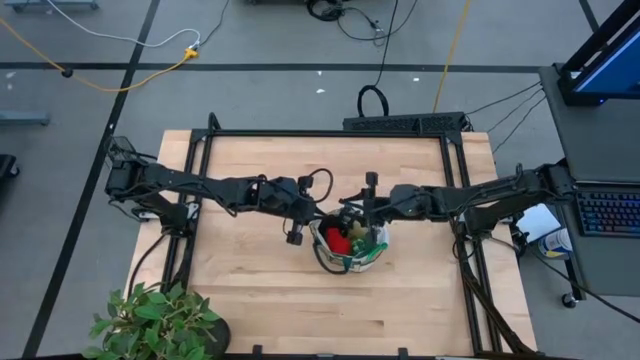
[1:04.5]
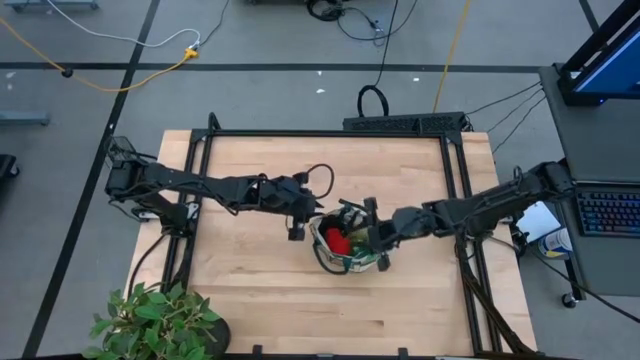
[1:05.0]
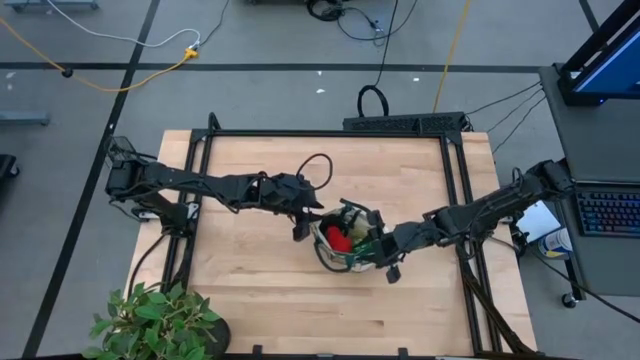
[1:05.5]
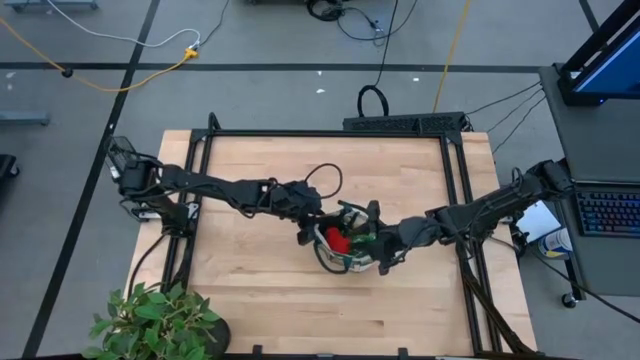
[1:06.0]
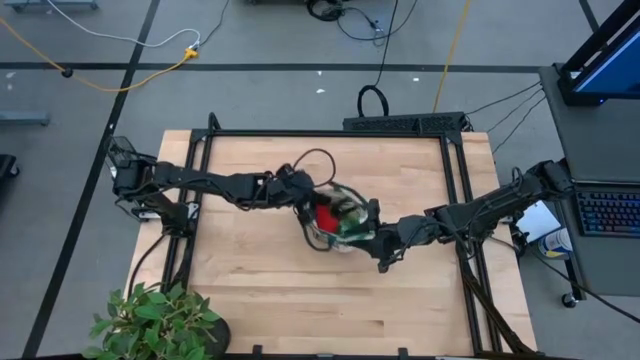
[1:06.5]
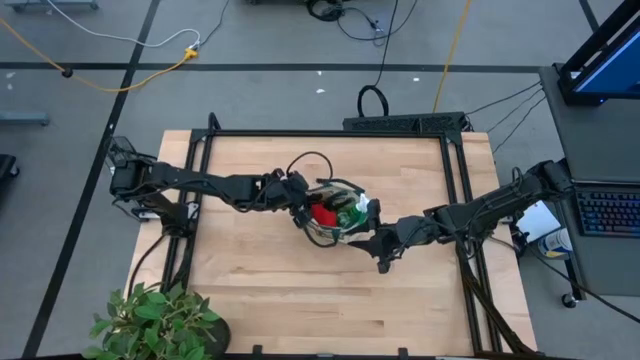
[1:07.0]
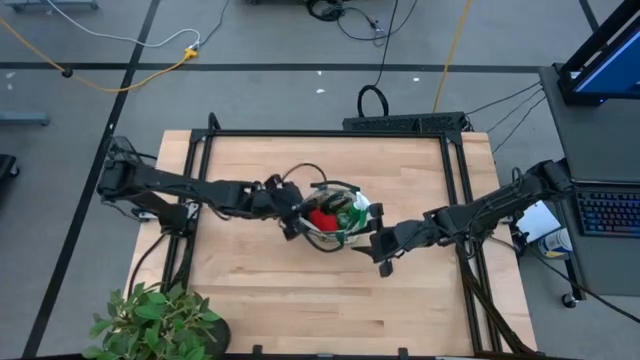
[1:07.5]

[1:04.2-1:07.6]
Task: Pick & Place Garden tools in Gardening bag
Adjust the light brown gardening bag

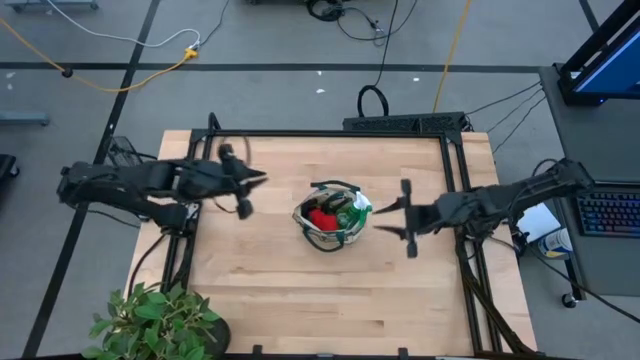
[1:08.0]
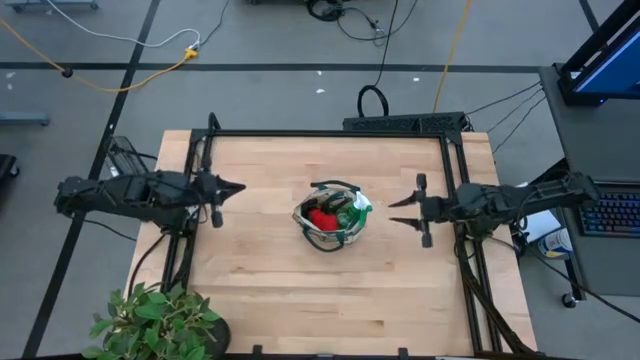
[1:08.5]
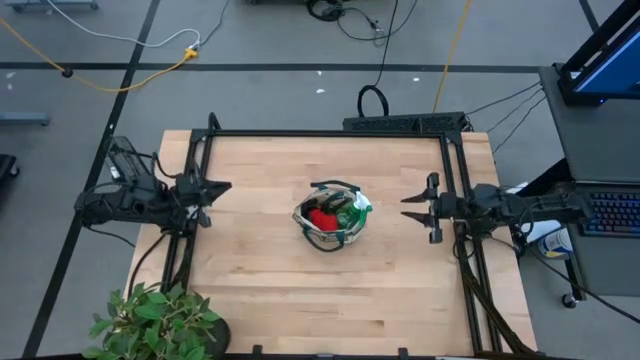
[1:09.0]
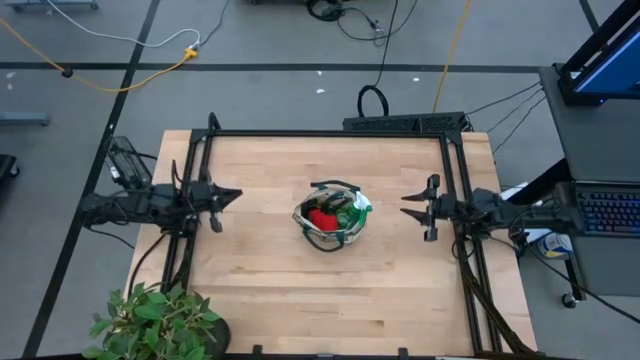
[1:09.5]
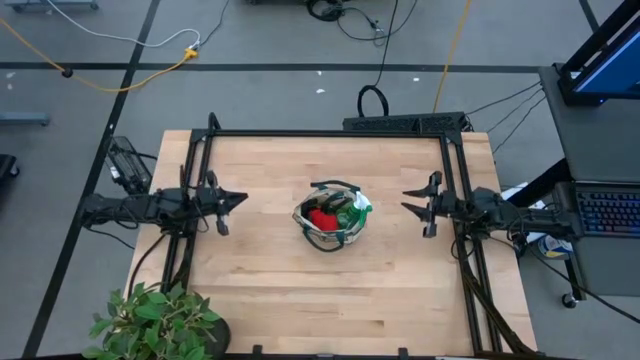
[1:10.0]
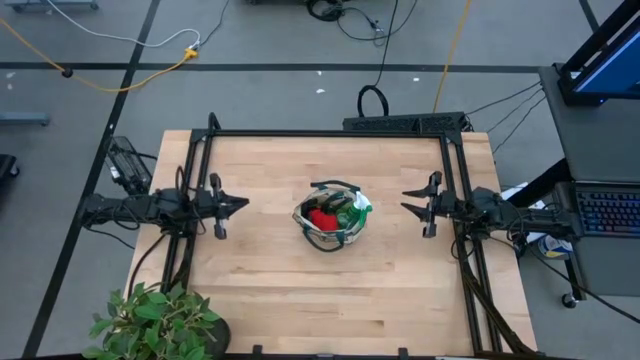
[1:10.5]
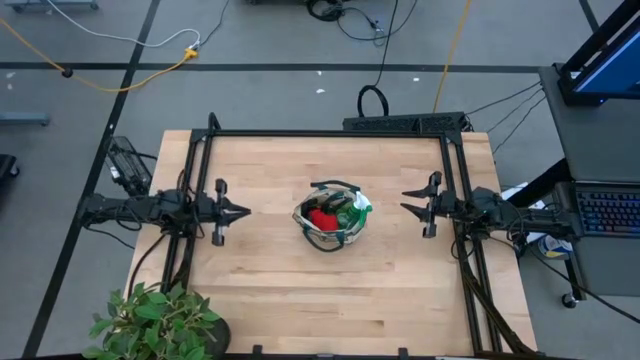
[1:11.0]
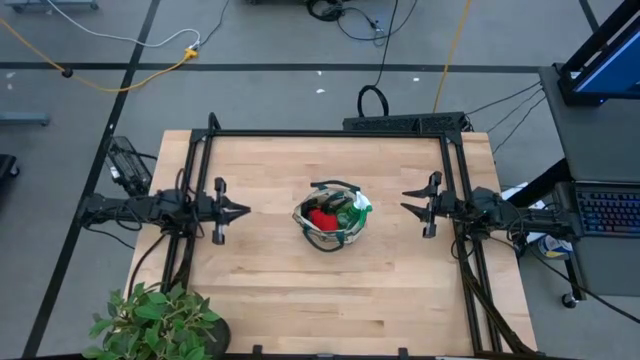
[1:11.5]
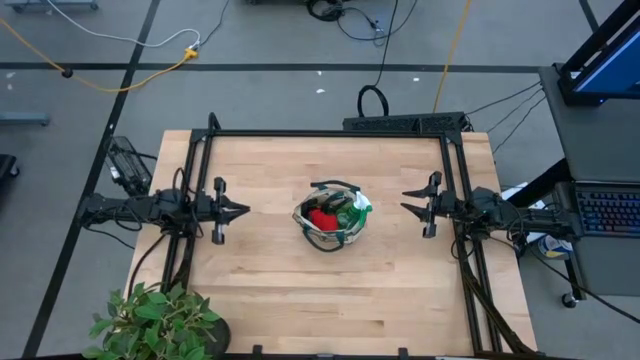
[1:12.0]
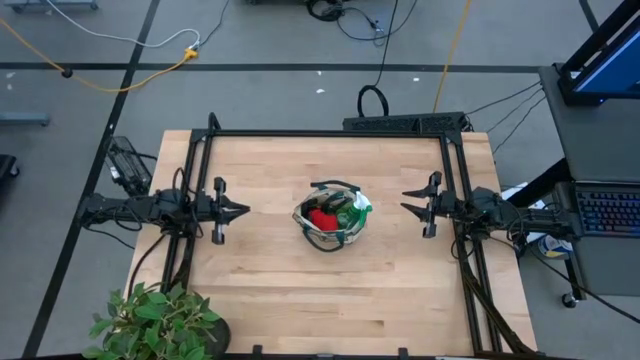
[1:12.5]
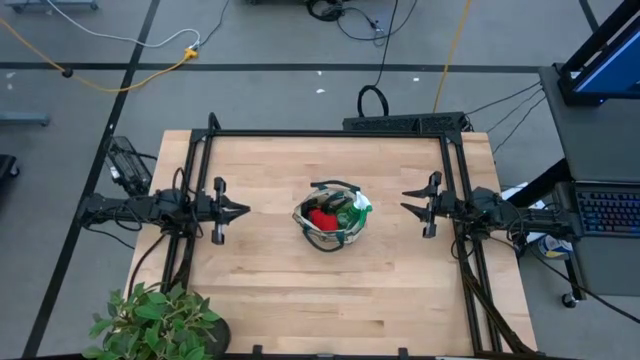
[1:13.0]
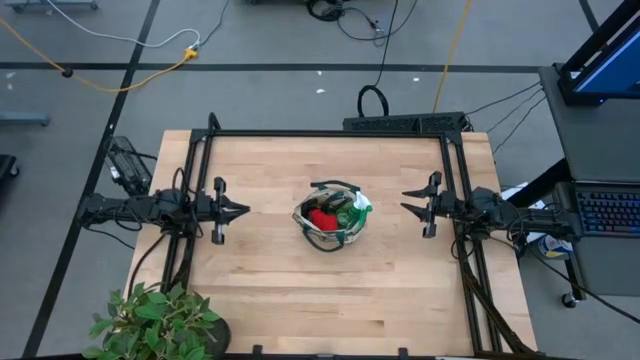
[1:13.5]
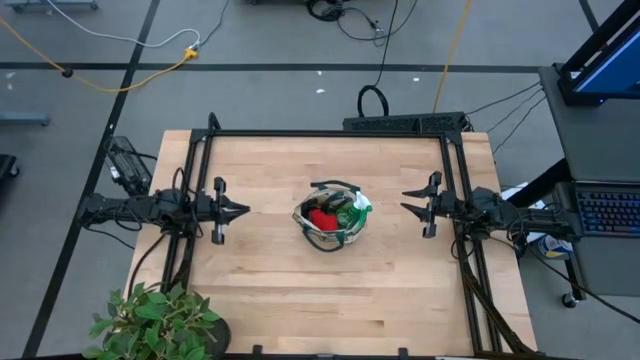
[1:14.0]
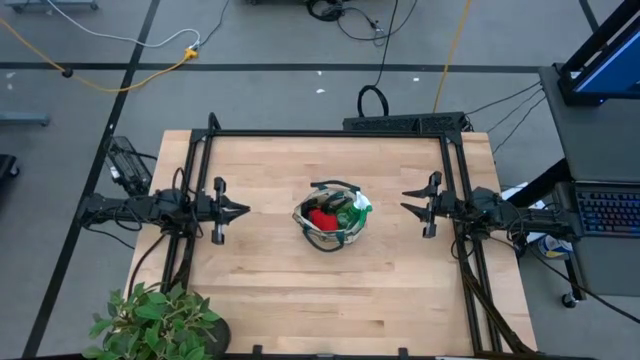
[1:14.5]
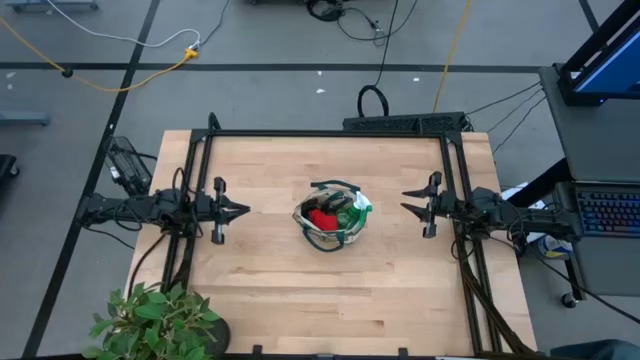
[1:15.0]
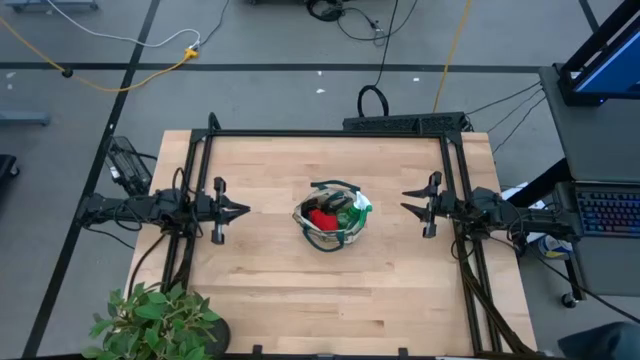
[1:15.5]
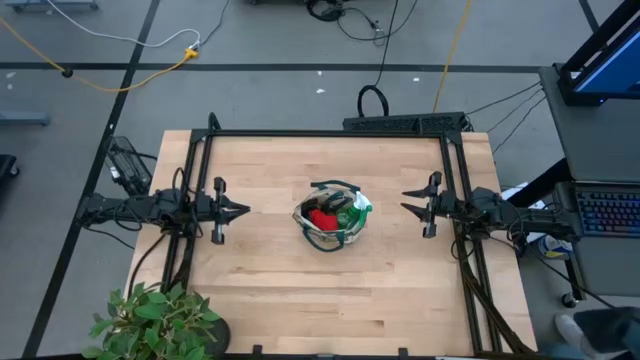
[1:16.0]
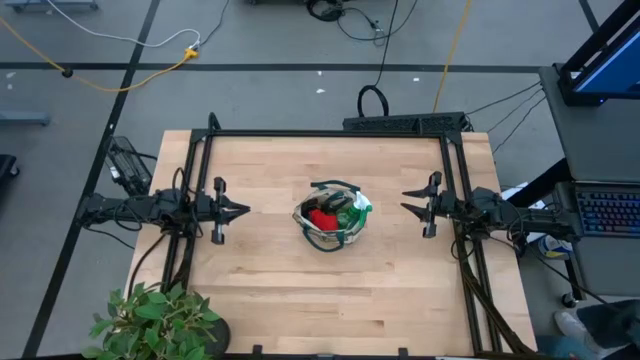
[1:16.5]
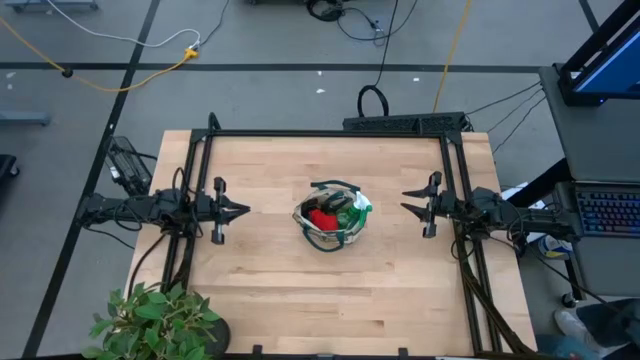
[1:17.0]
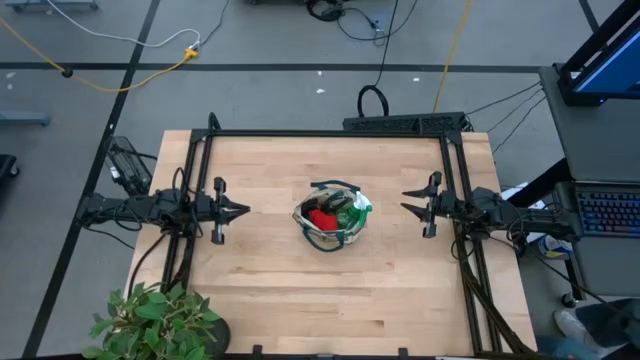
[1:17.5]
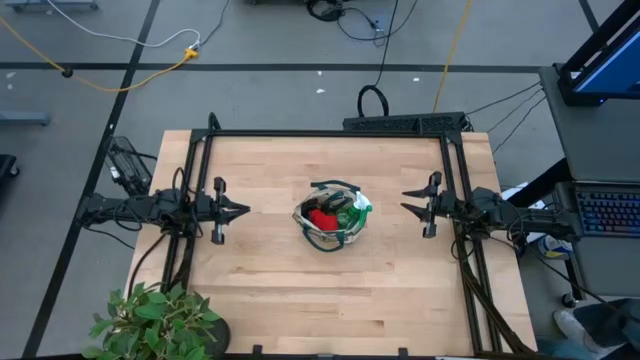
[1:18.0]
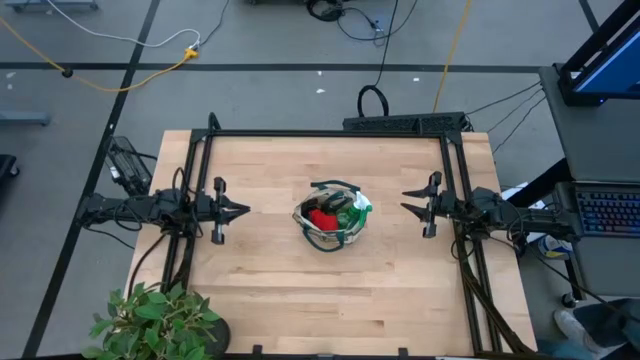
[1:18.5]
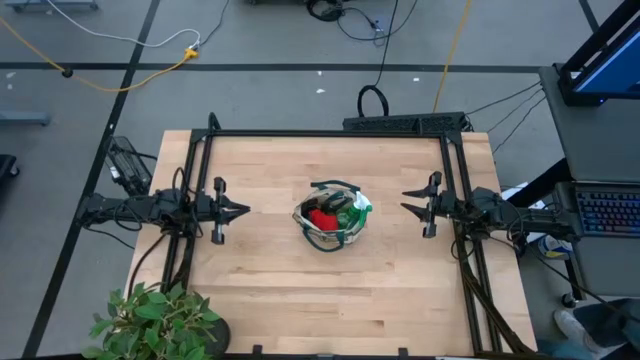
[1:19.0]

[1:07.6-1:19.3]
Return to Home Position

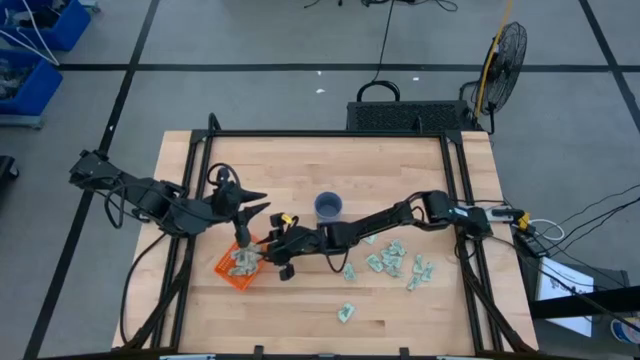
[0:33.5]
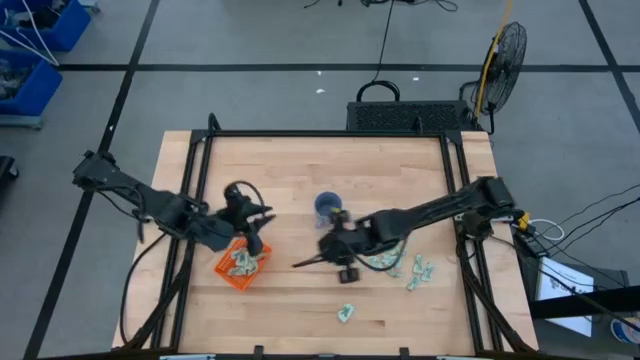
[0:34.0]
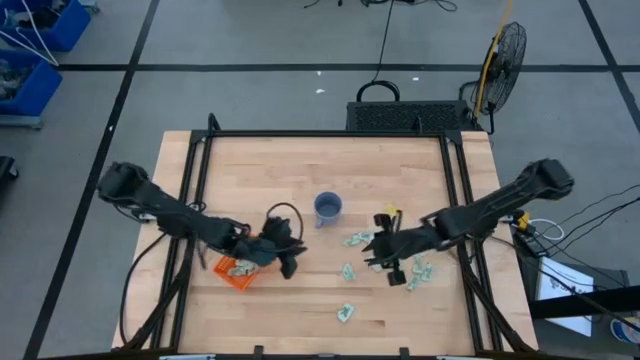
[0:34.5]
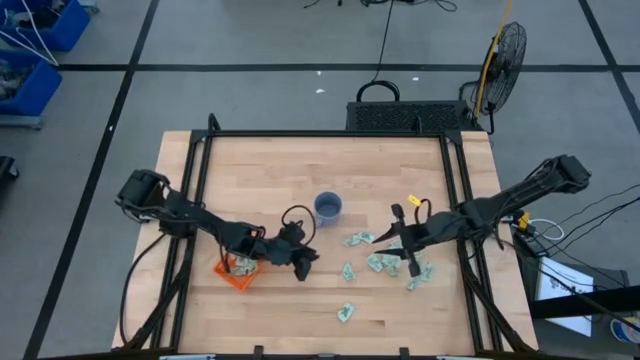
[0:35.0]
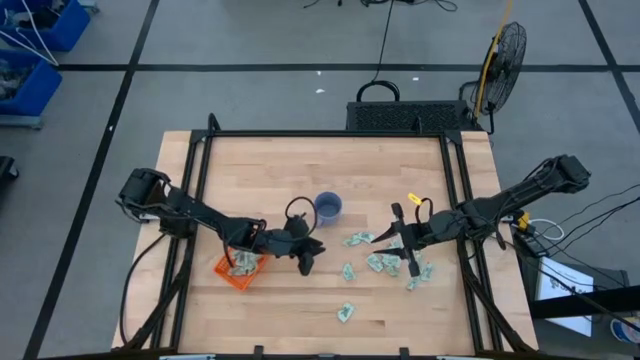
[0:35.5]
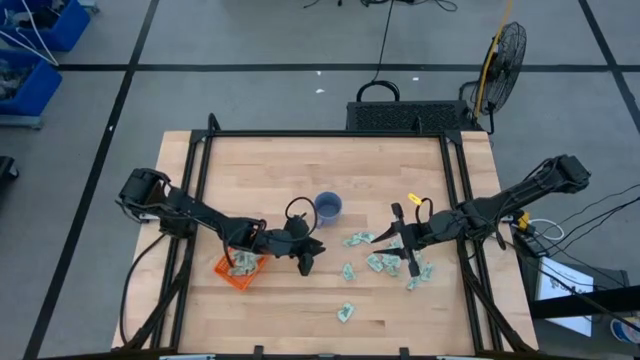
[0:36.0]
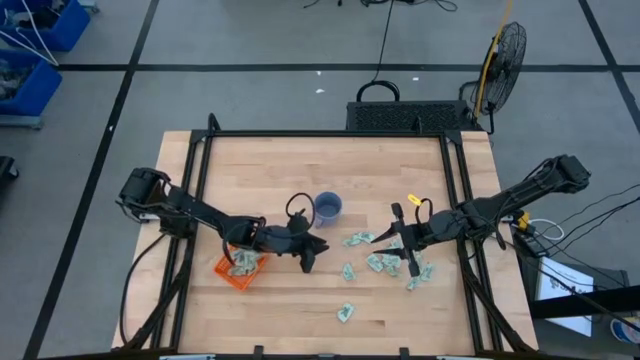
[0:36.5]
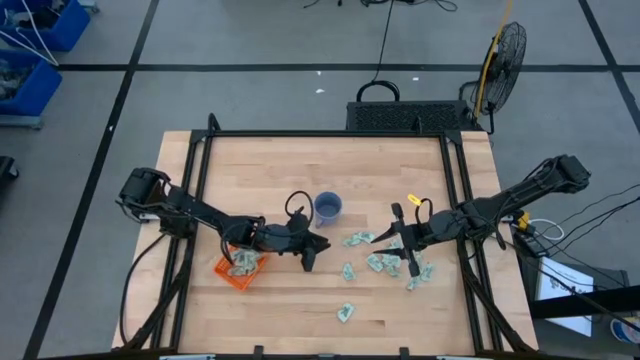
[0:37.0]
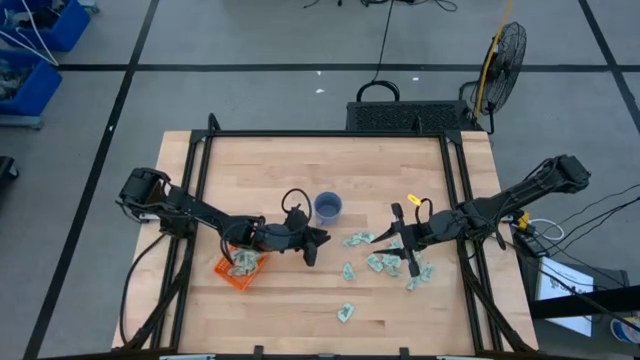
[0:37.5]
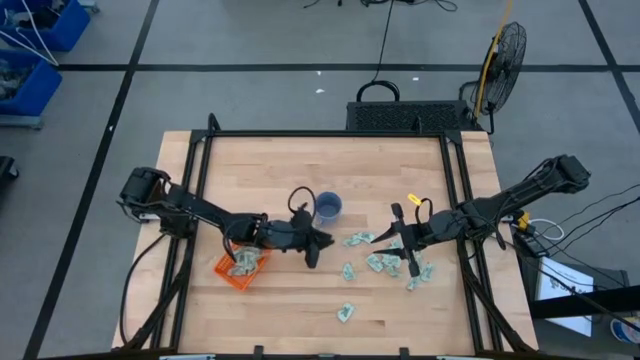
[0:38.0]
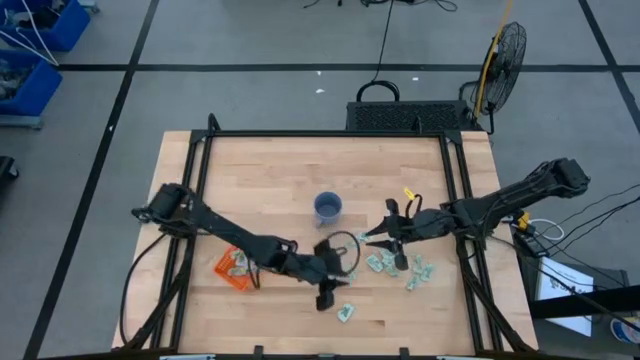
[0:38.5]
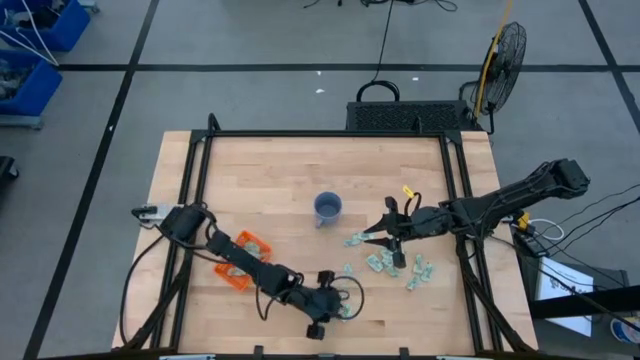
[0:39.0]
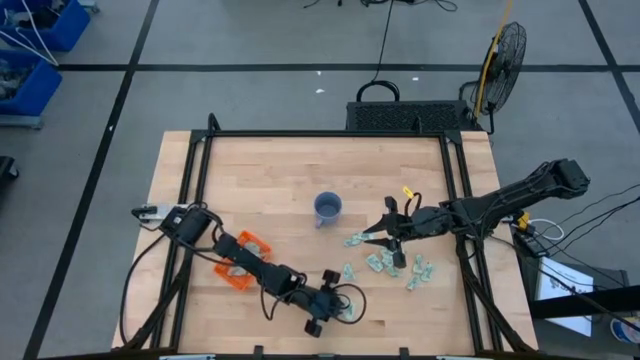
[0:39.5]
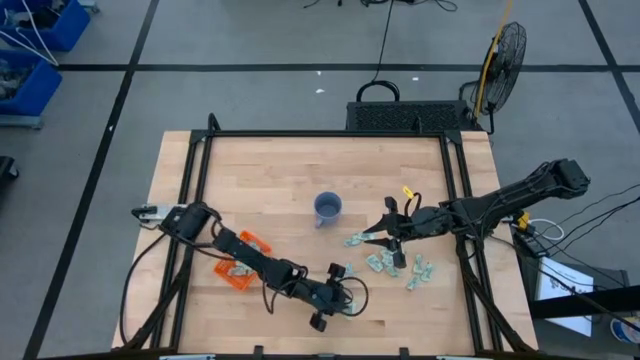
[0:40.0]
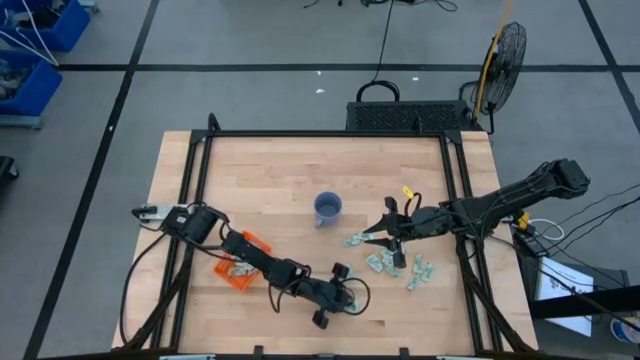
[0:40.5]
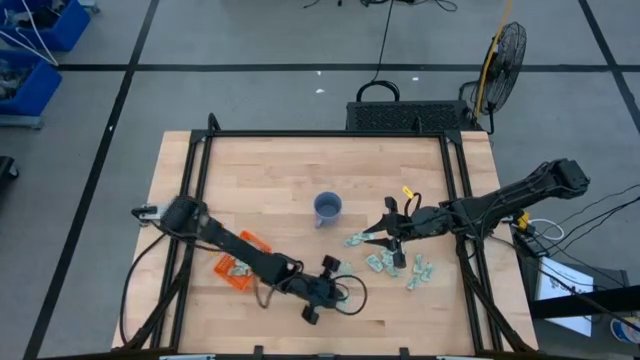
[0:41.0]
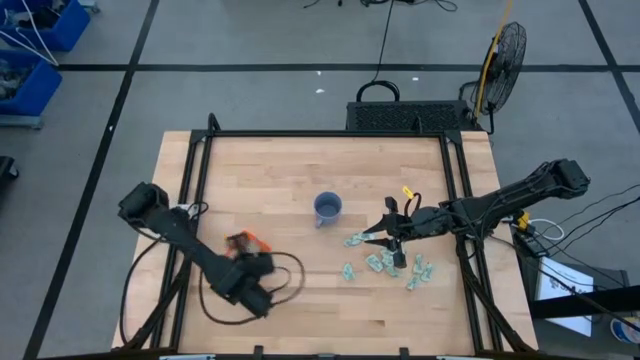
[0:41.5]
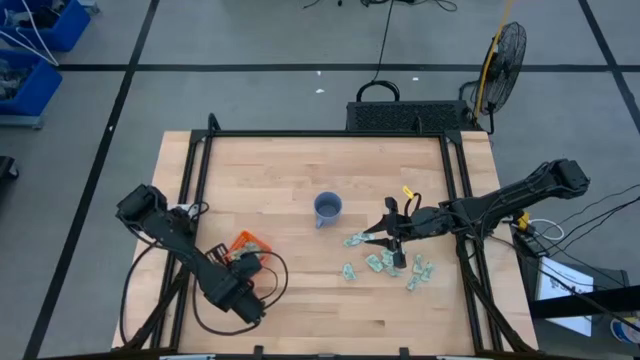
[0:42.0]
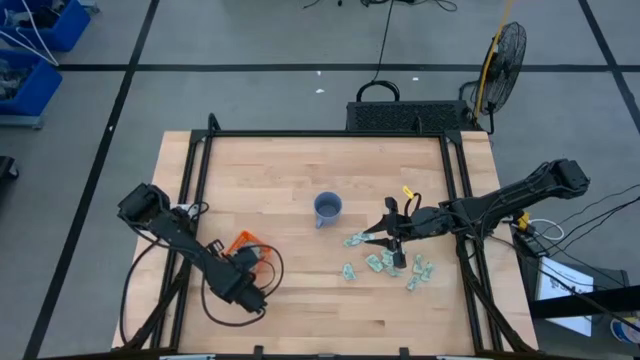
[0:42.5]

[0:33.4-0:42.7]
Task: Pick and place Stevia / Truvia into bins
Put the green stevia packet into the orange basket
